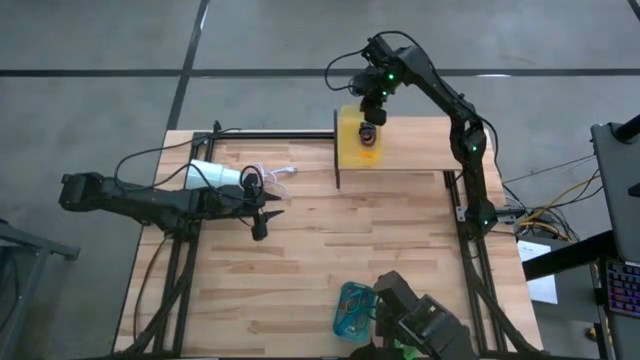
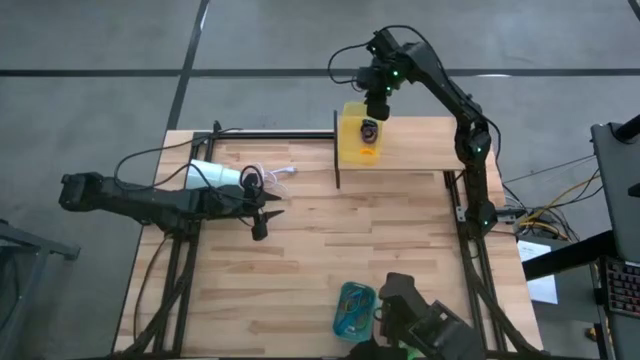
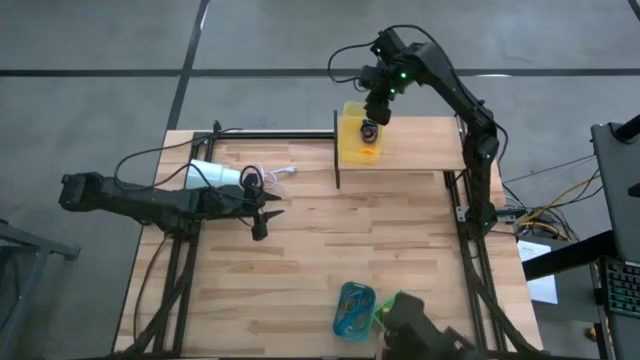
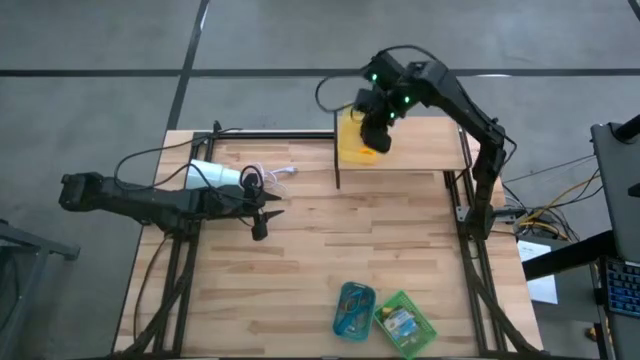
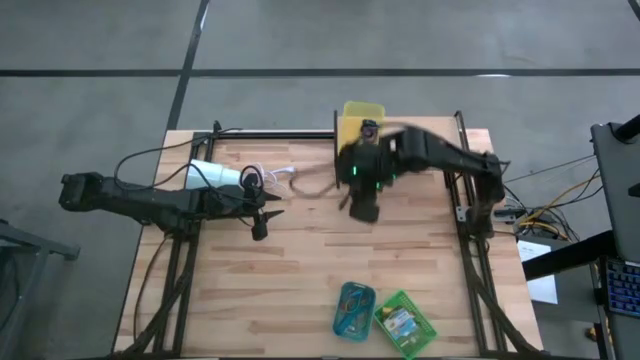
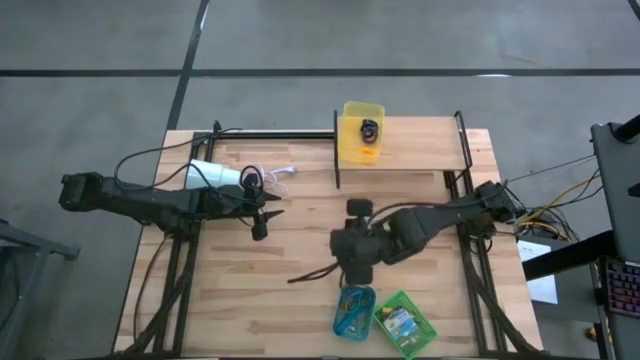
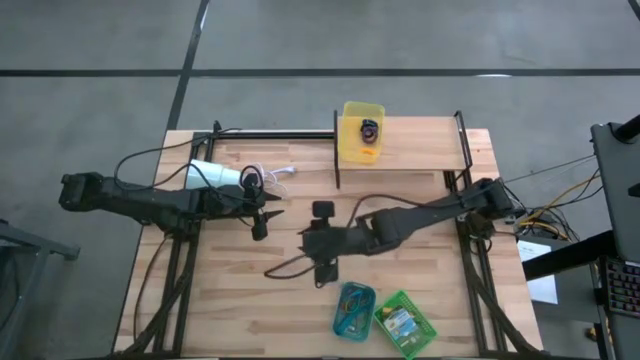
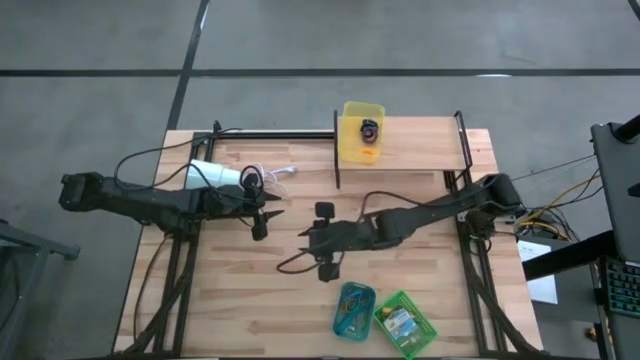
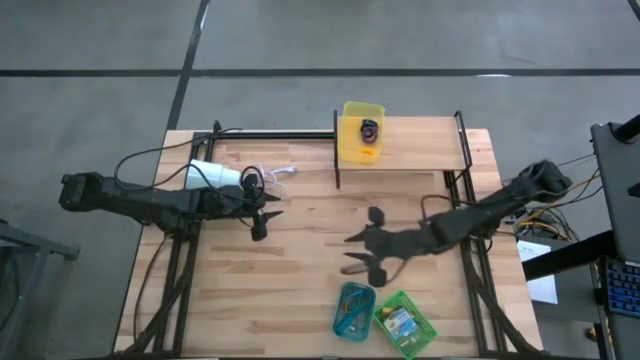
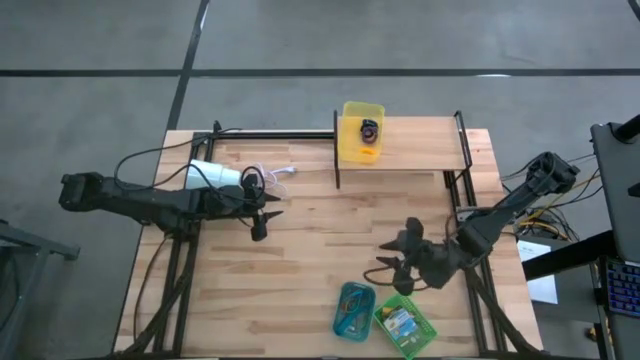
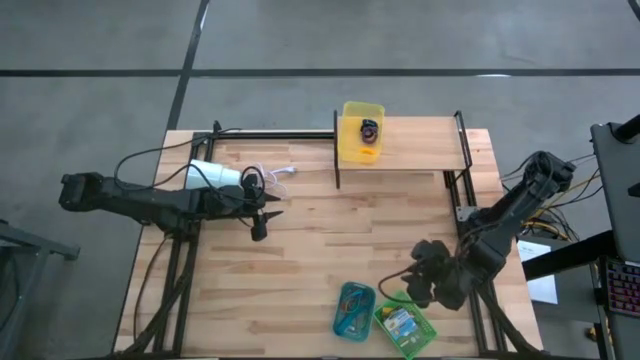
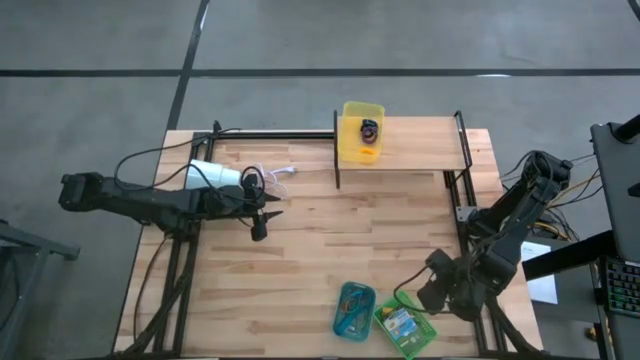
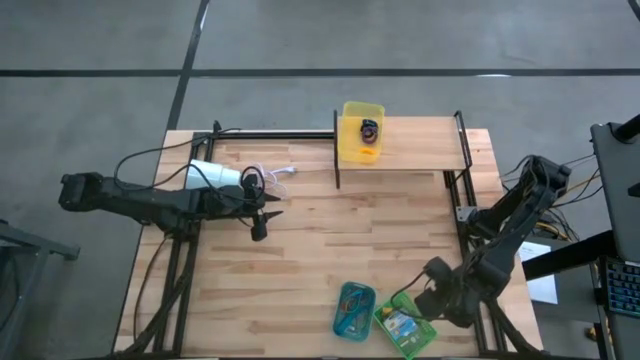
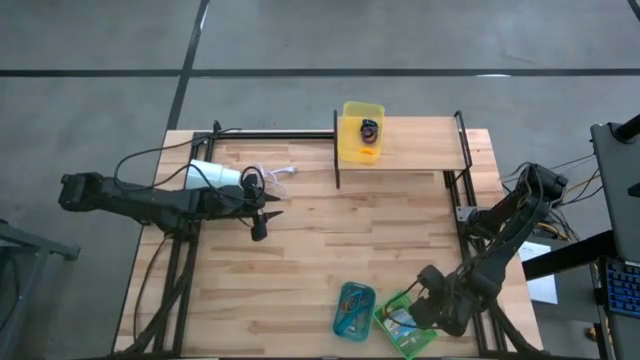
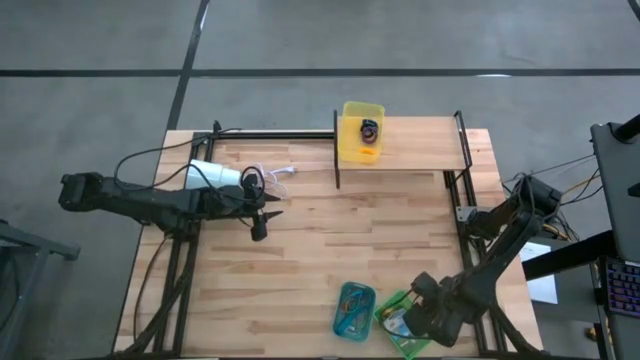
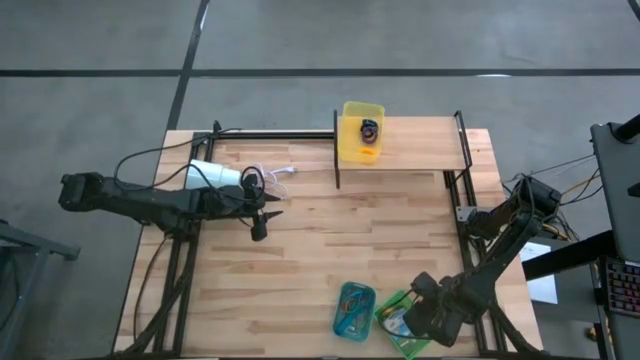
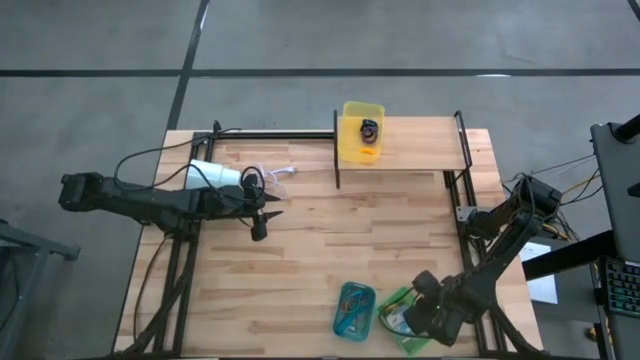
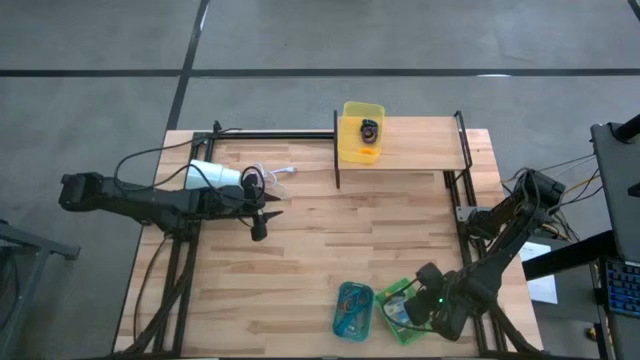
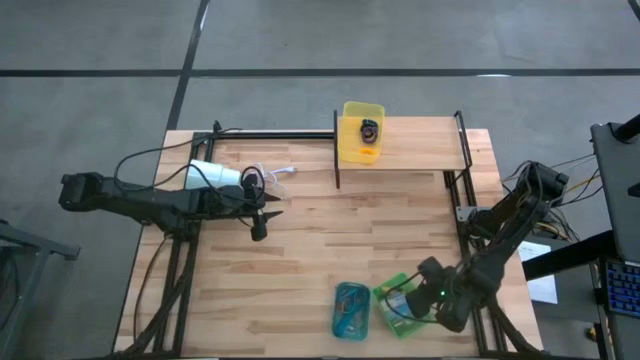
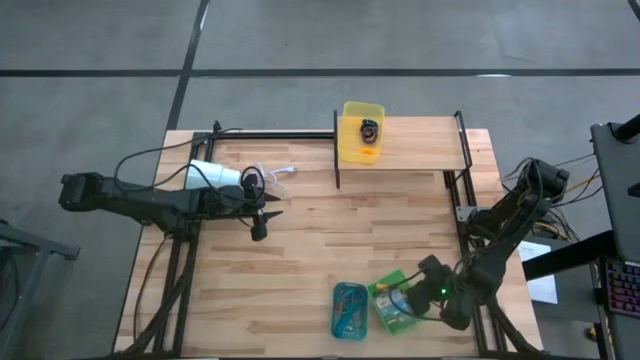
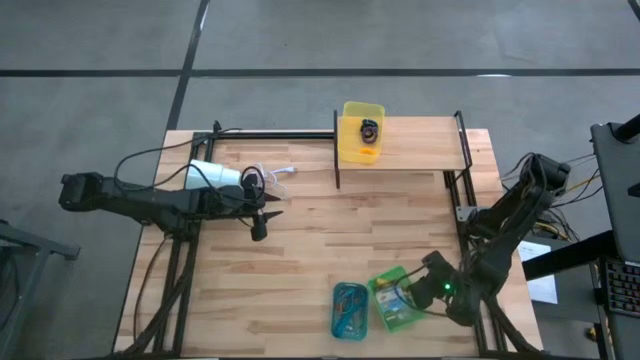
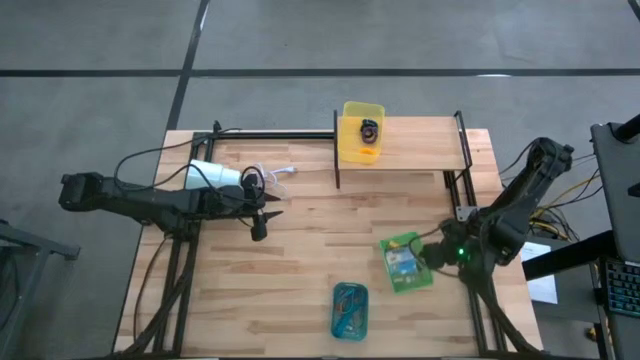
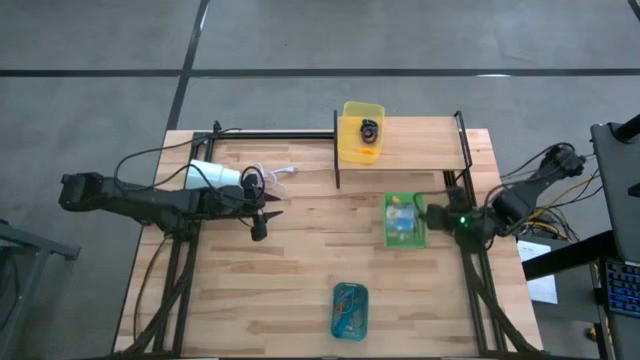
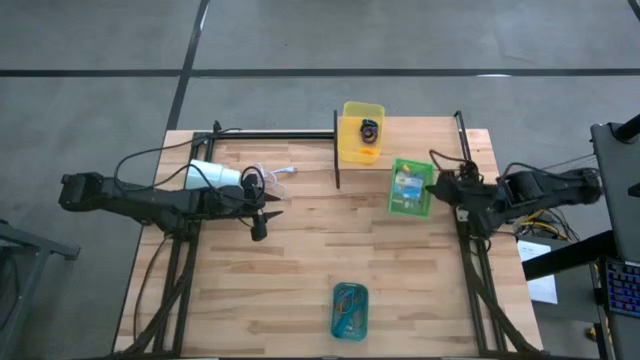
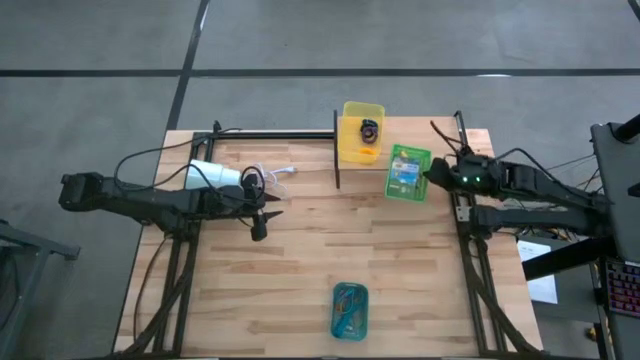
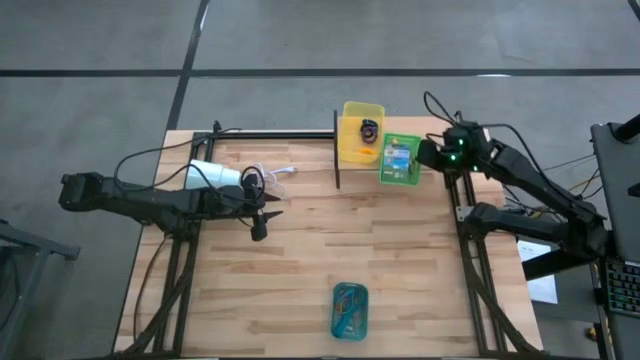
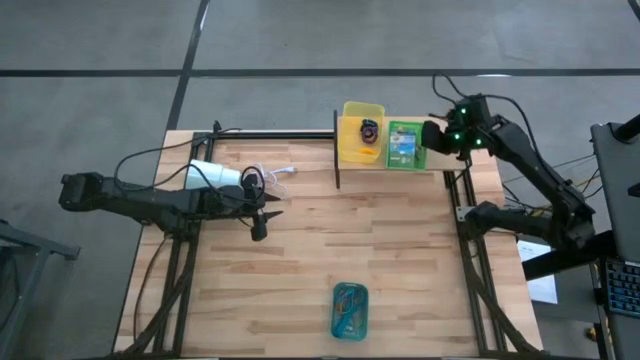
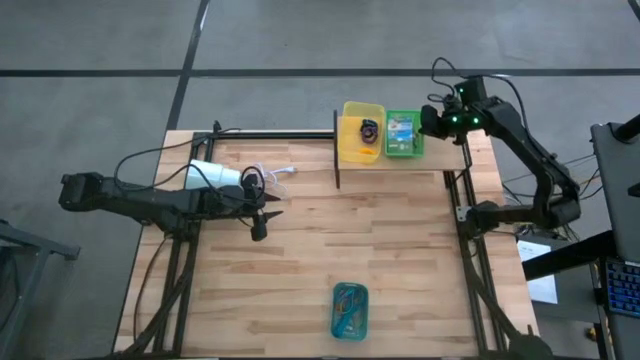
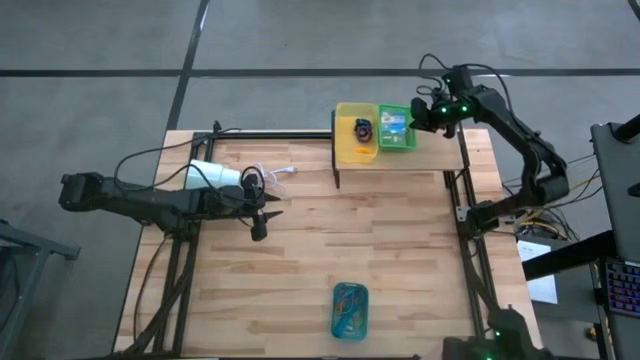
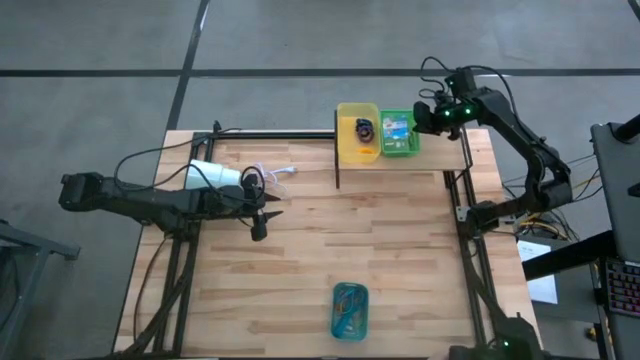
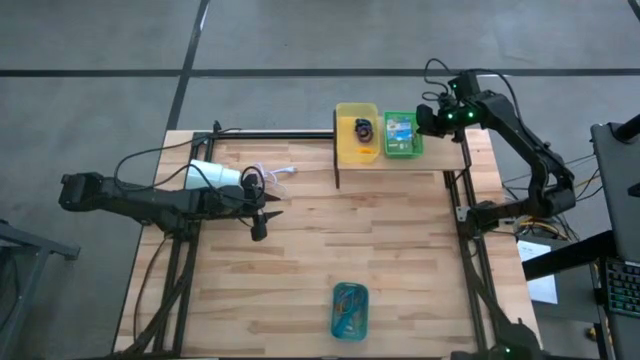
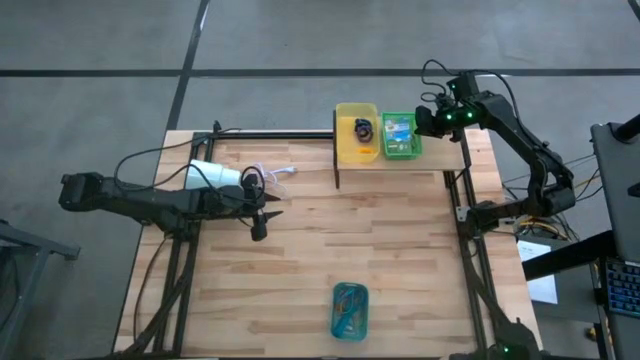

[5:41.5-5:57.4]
Task: Pick & Place Office Desk Supplies
Put the green bin on the shelf

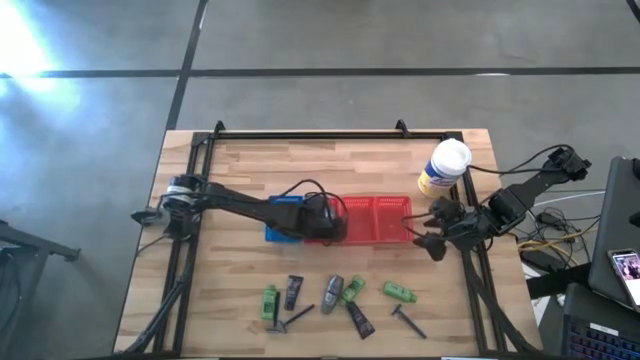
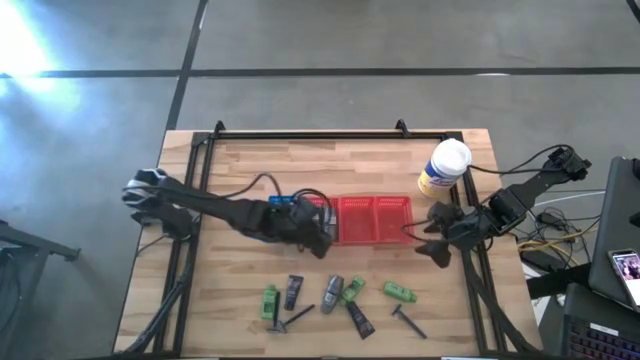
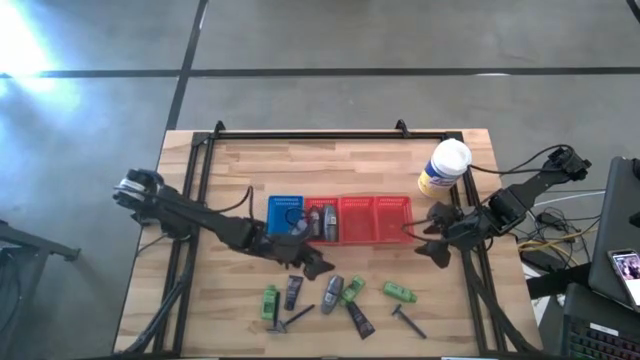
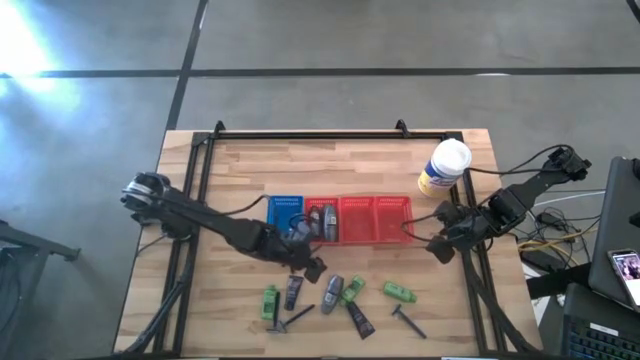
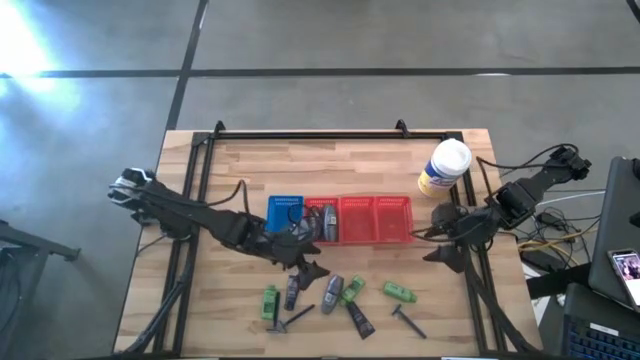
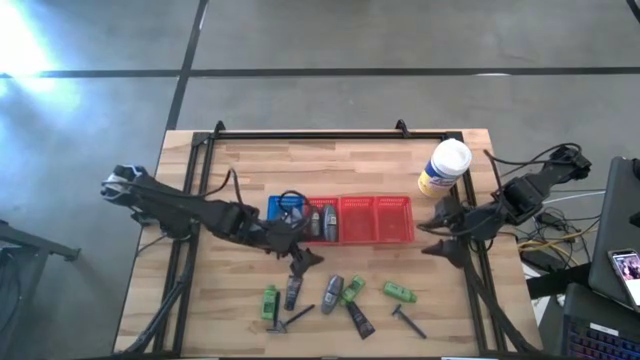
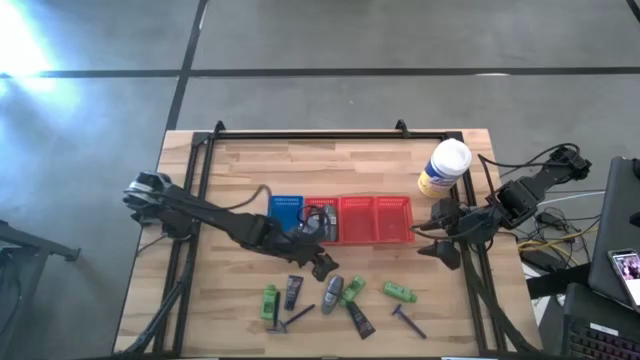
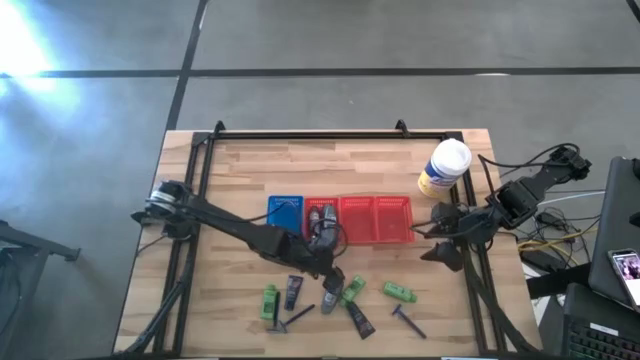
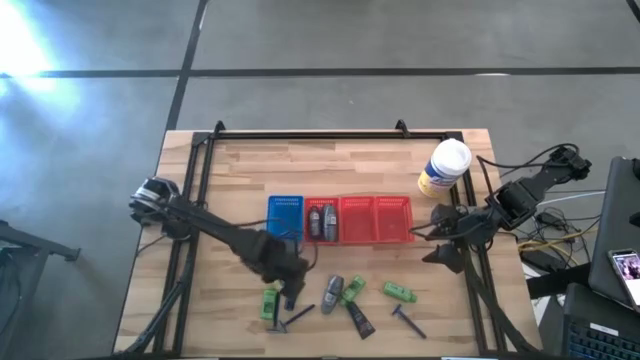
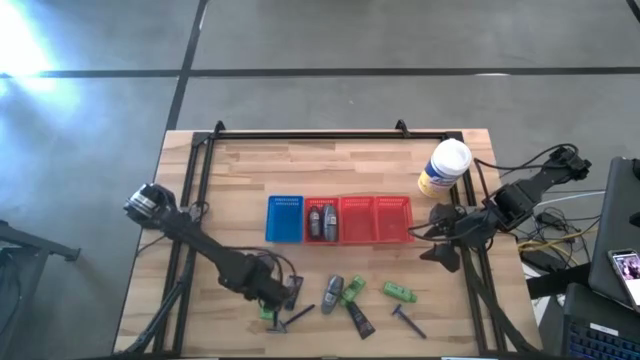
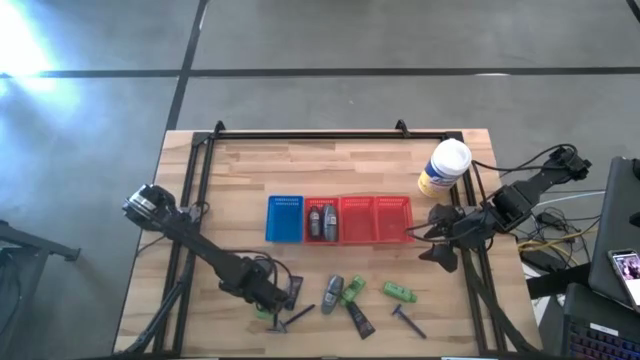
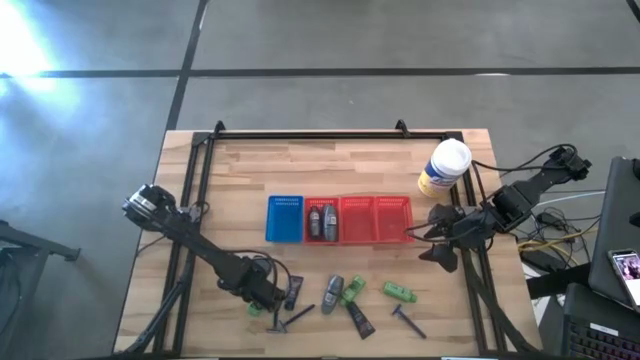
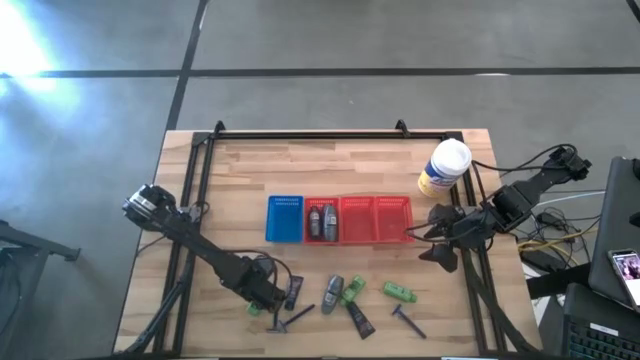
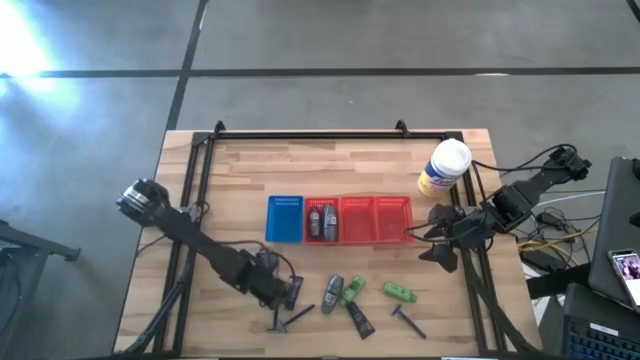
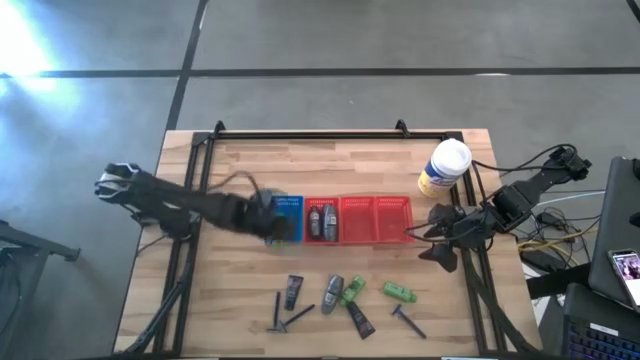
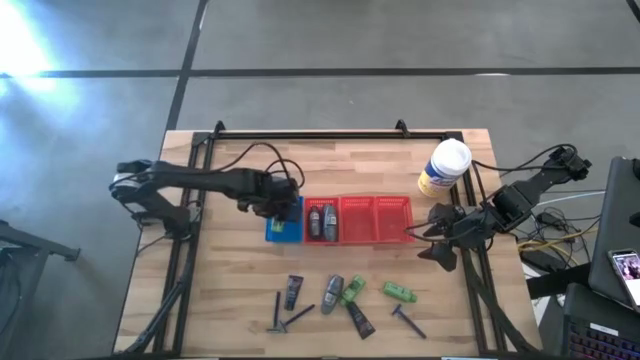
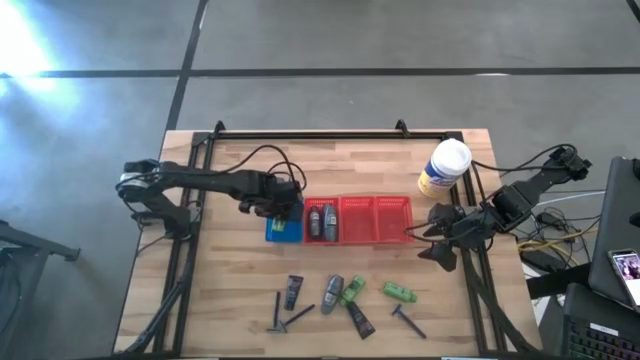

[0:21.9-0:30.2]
Task: Pick & Place Travel size toiletries
Put the green shampoo into the blue bin
